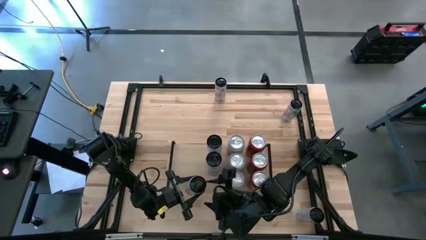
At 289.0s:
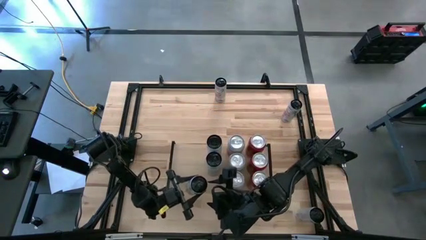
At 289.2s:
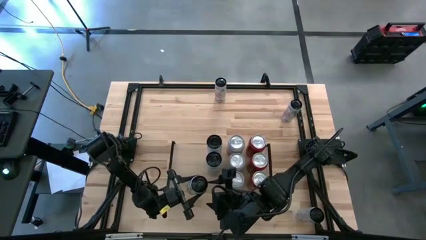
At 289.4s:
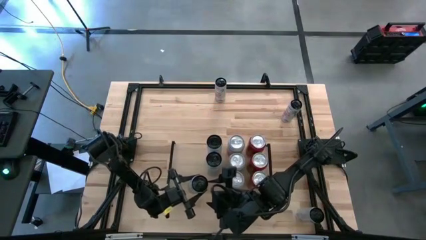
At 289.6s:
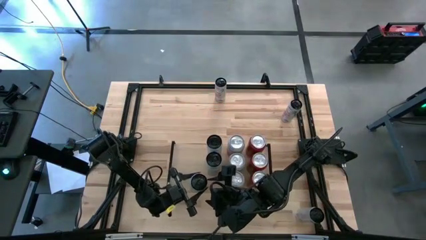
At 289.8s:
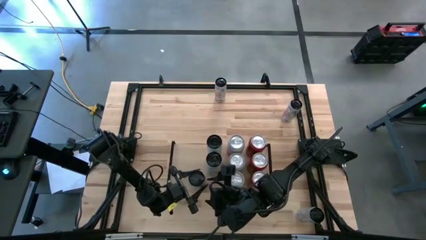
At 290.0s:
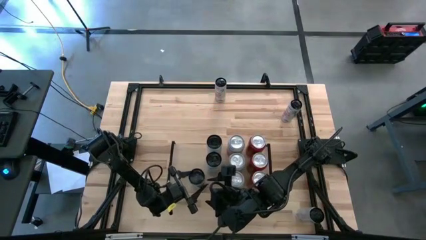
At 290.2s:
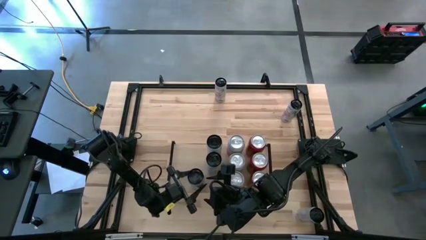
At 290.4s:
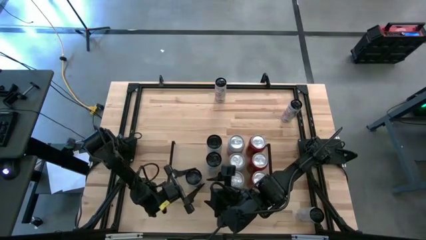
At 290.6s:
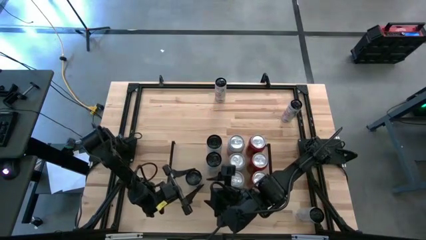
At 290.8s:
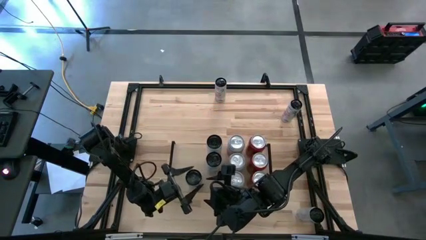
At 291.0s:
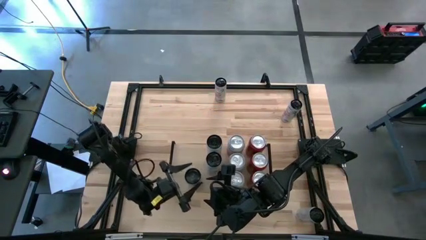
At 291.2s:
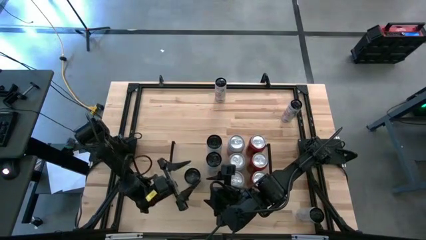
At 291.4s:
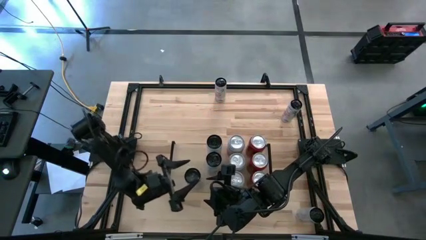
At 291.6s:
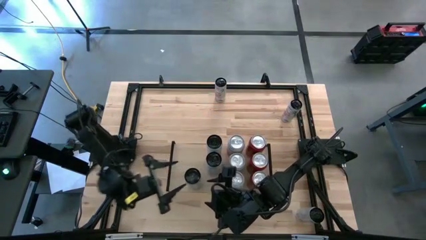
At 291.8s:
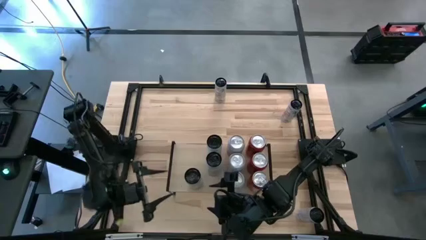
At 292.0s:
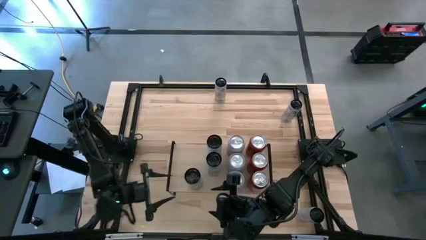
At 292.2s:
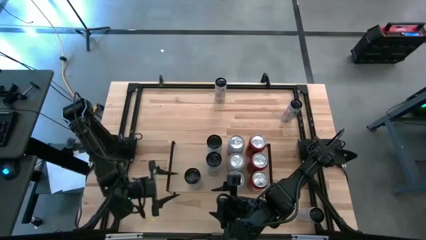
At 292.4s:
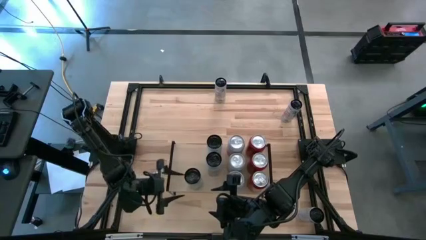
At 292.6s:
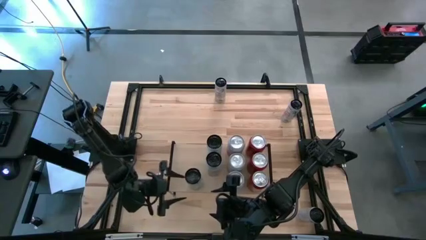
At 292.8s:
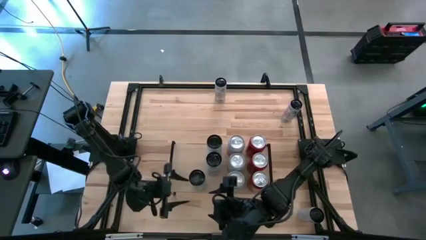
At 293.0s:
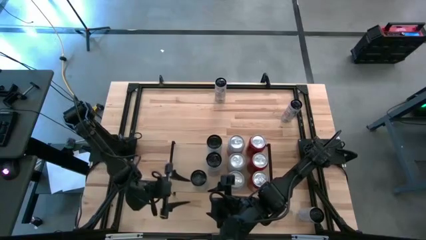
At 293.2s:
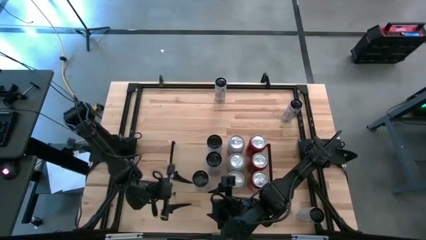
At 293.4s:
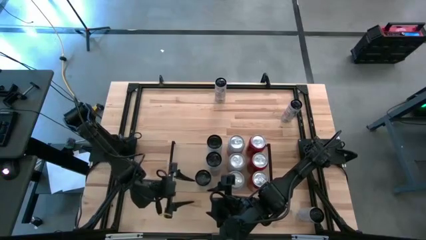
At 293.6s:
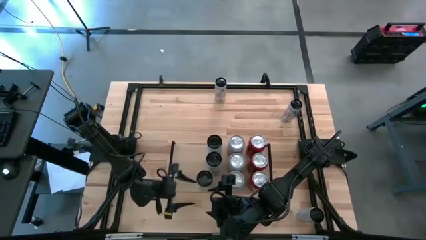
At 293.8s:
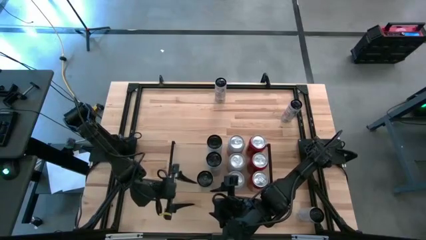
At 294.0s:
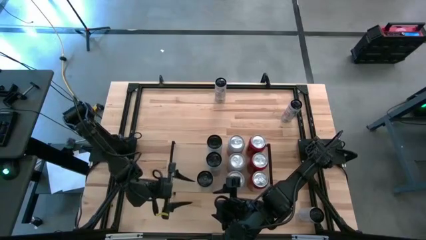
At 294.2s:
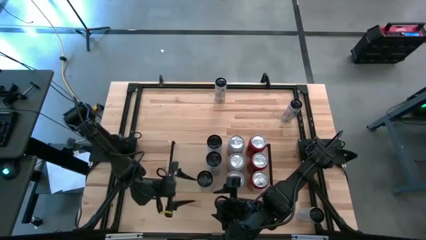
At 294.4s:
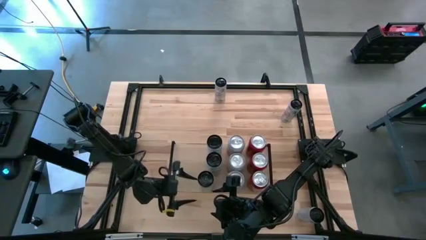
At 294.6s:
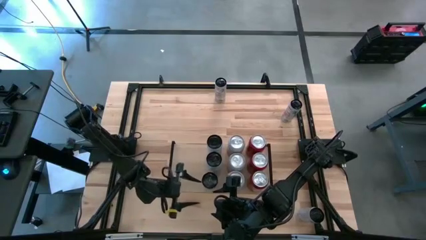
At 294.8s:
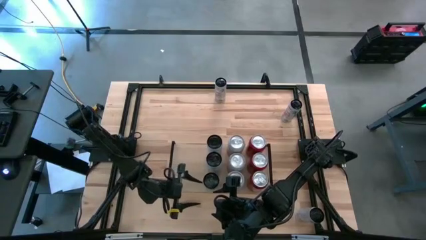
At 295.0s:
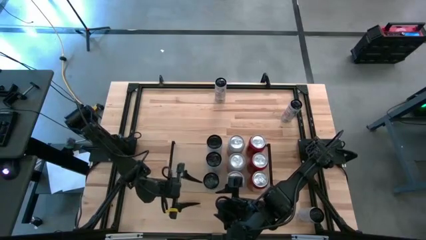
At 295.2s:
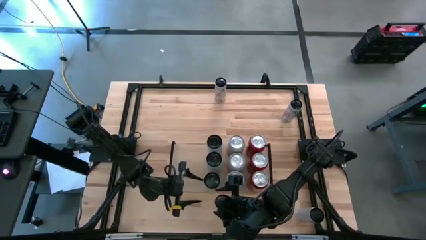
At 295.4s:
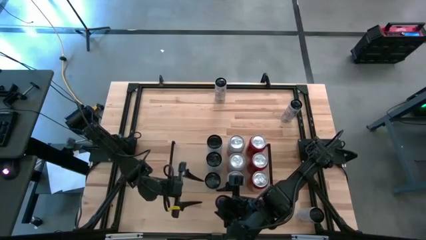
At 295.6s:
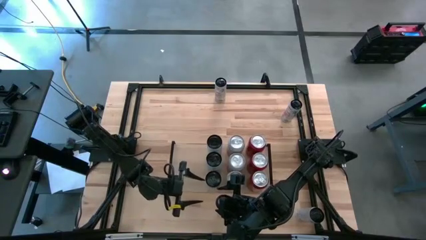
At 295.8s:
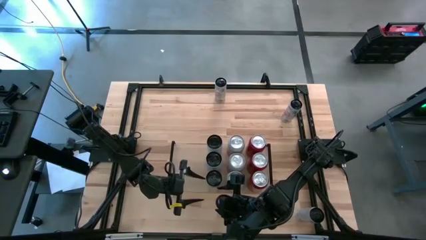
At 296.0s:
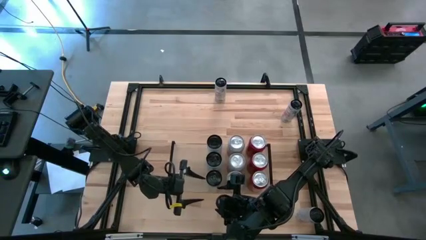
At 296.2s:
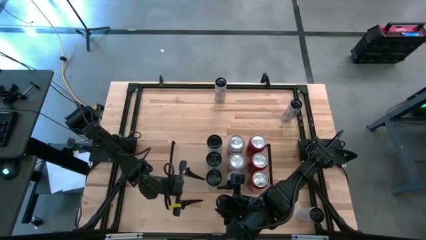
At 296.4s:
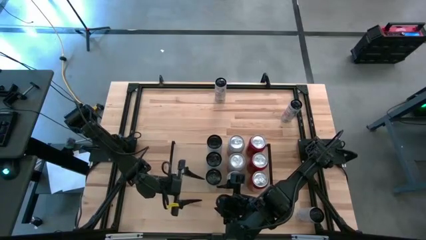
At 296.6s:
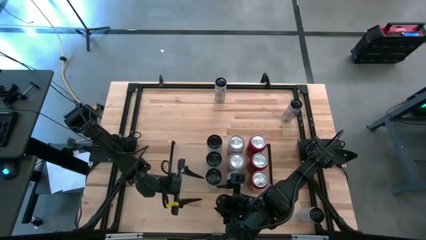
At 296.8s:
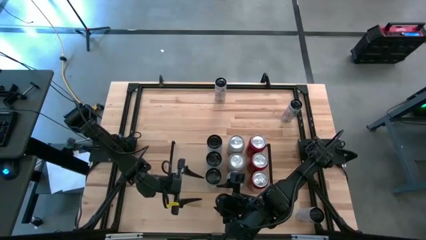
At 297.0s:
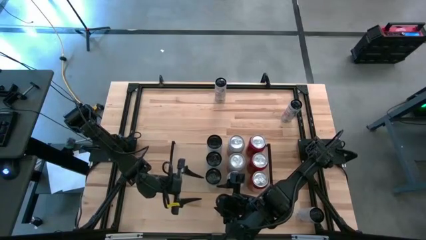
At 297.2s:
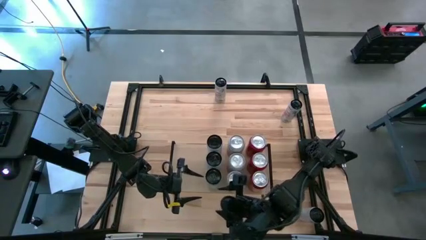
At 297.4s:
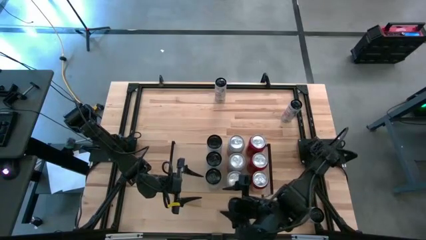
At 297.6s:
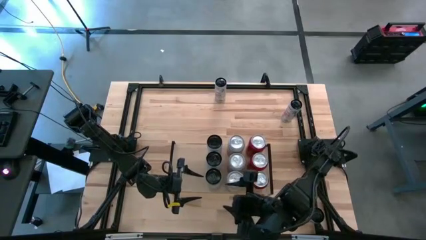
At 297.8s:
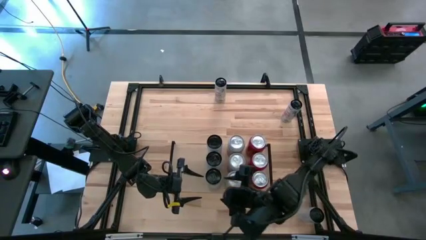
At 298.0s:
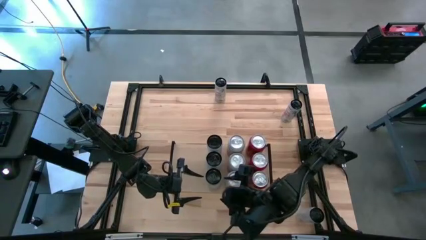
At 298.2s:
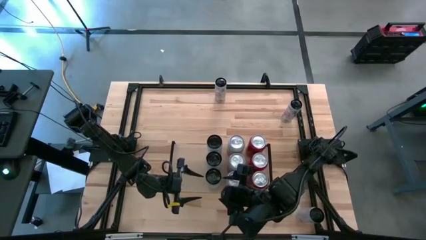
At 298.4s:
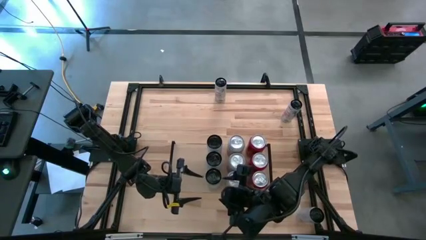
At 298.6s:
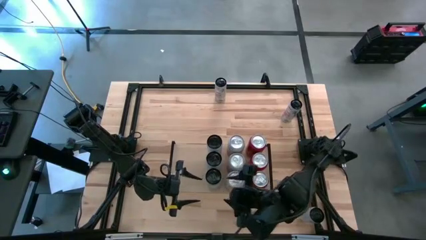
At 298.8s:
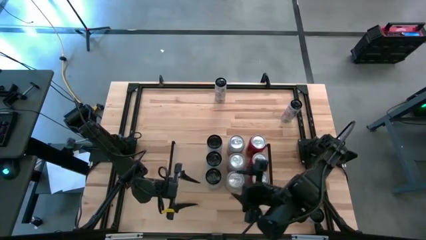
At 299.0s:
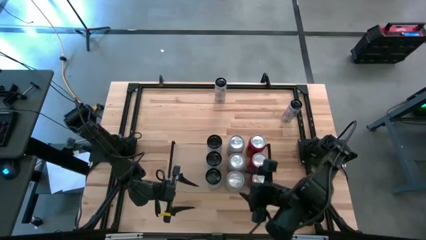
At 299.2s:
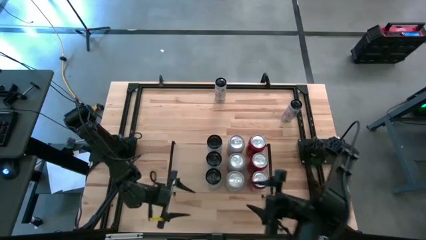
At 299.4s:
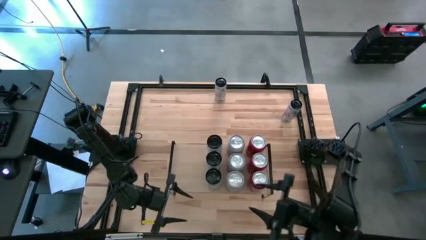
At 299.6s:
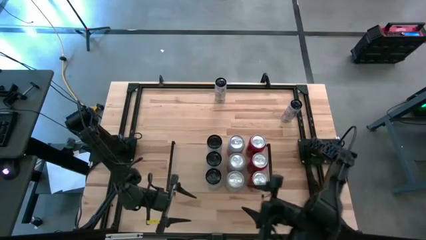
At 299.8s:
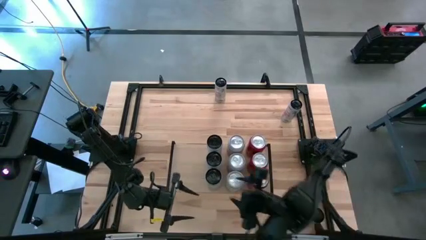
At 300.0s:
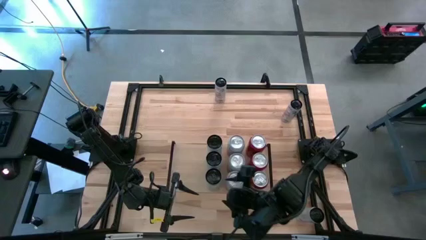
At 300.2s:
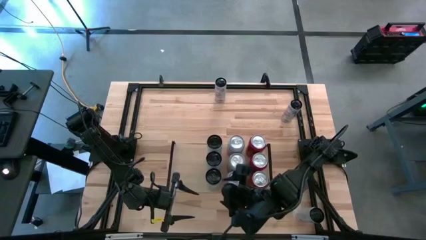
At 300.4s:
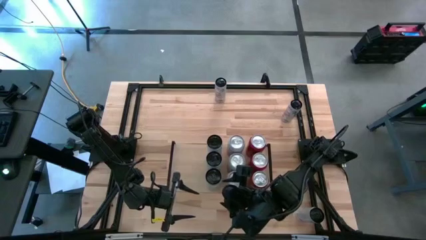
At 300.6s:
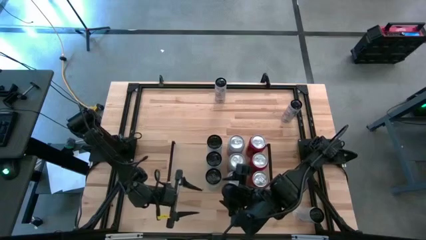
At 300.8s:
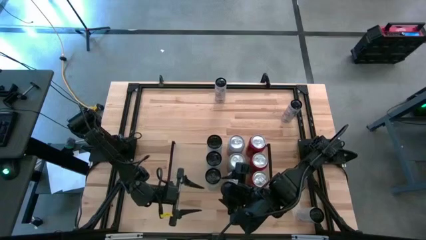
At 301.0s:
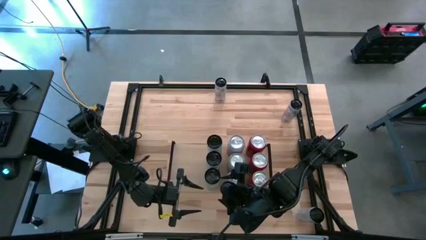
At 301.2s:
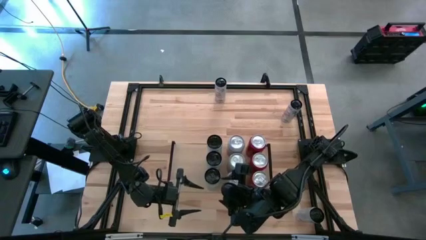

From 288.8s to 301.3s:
Task: Place canned beverage on shelf
Put the white-blue soda can on the shelf aligned with the other white-blue soda cans
